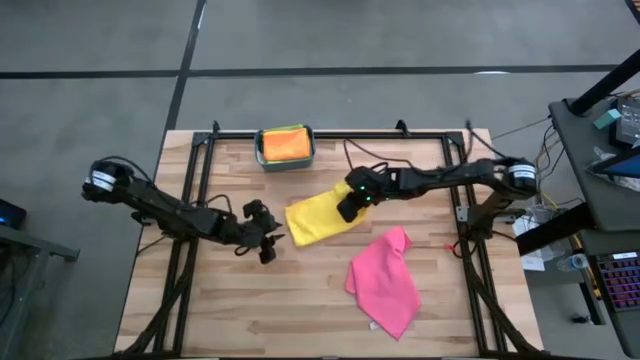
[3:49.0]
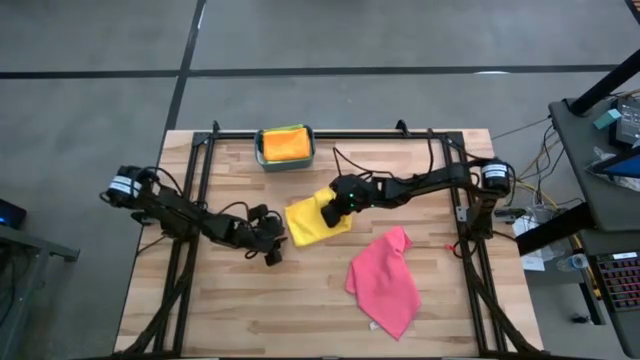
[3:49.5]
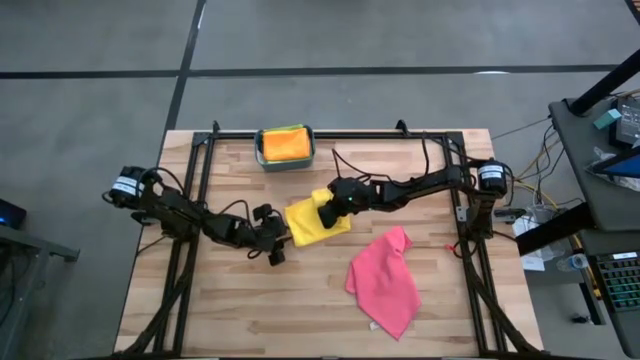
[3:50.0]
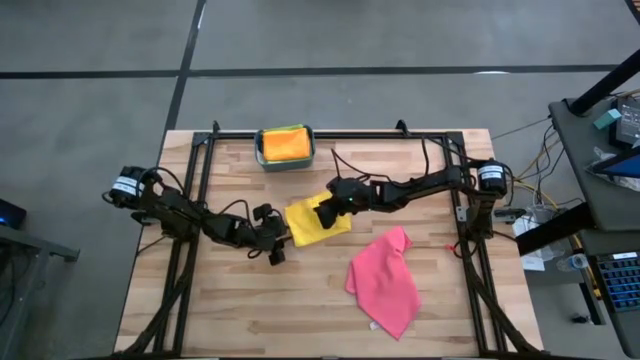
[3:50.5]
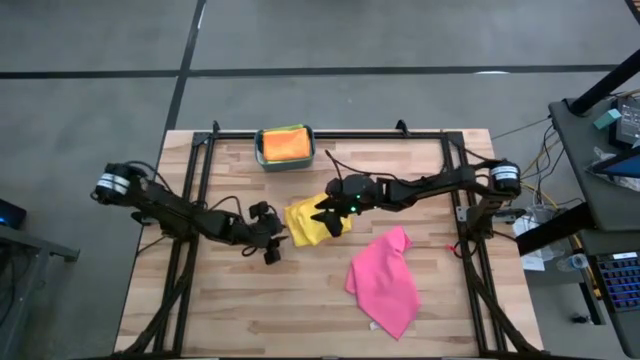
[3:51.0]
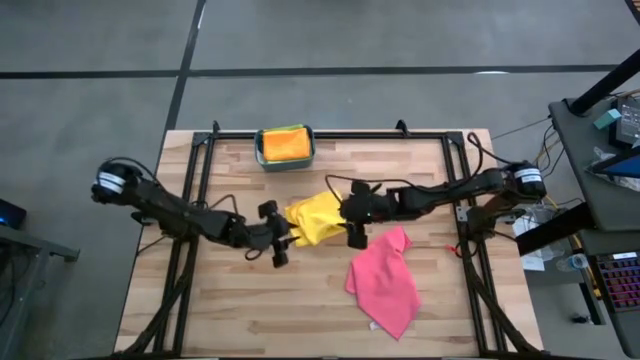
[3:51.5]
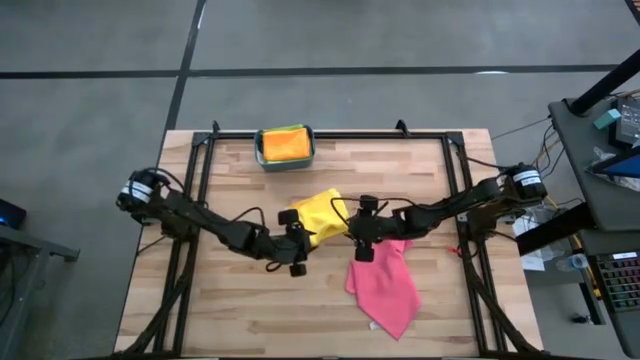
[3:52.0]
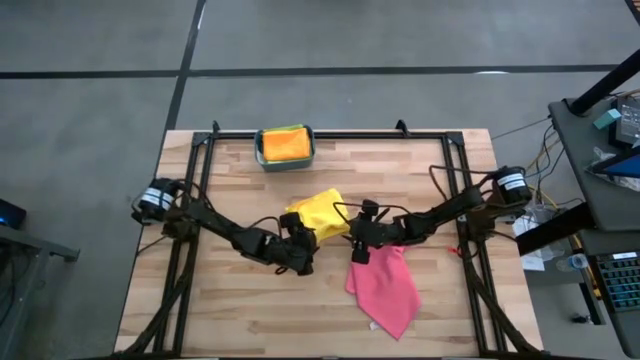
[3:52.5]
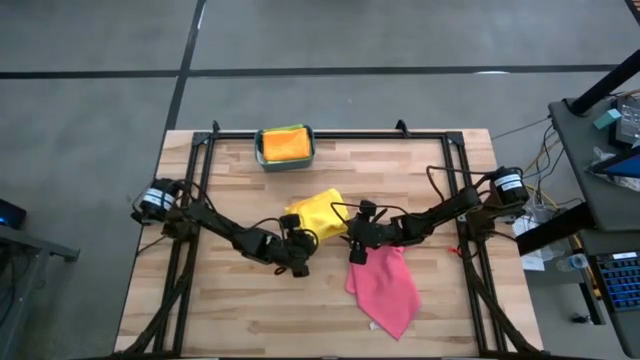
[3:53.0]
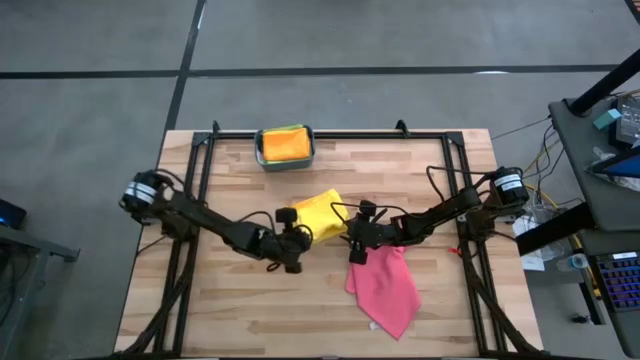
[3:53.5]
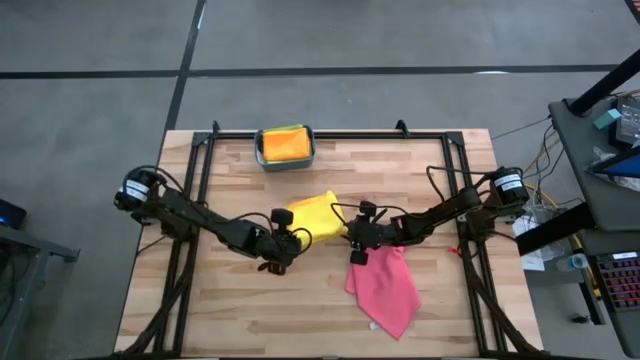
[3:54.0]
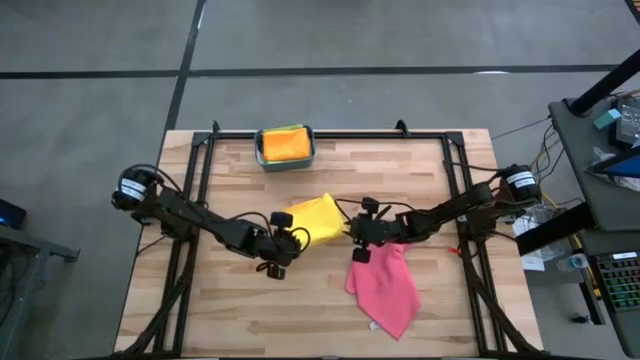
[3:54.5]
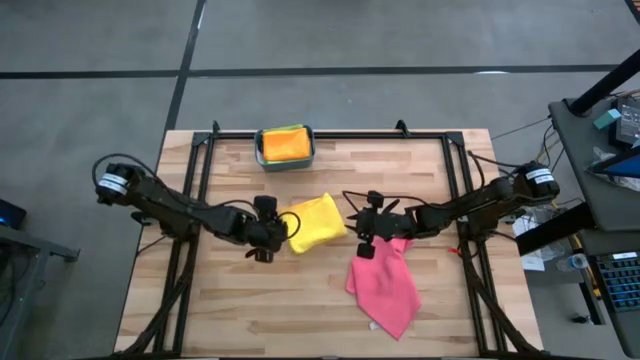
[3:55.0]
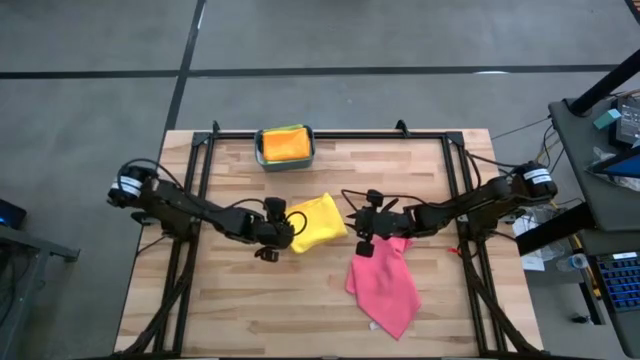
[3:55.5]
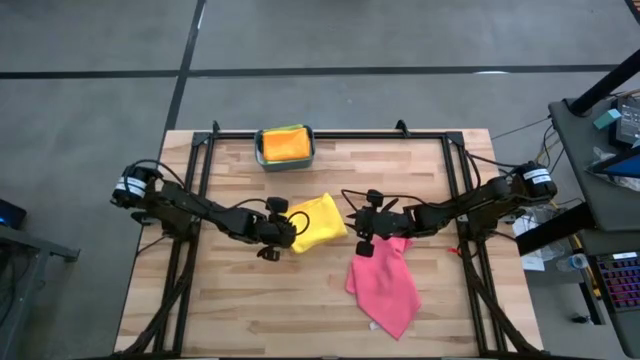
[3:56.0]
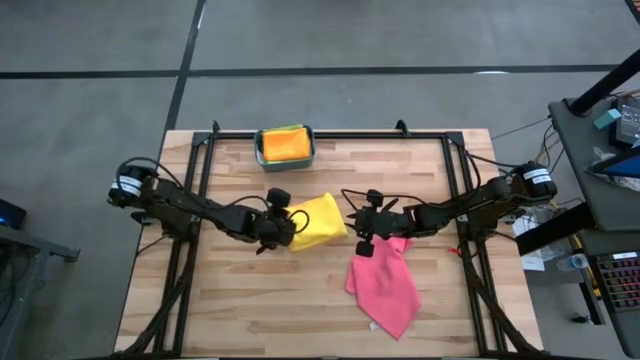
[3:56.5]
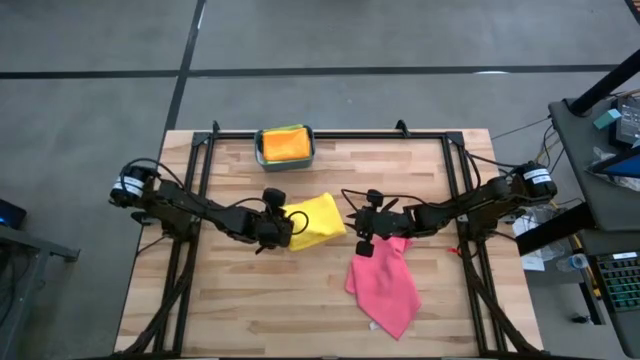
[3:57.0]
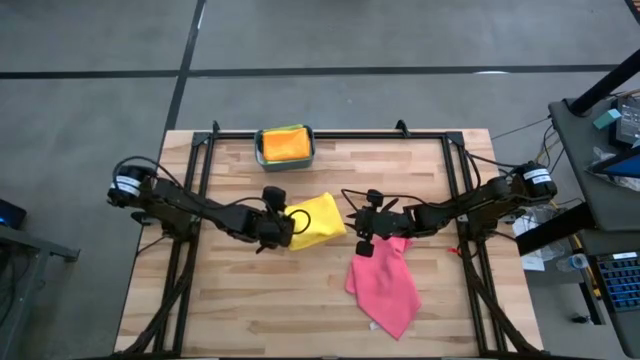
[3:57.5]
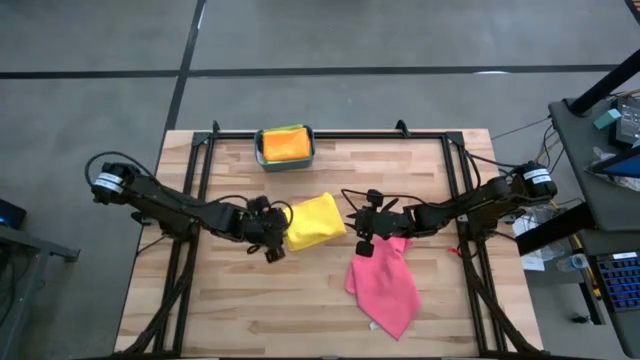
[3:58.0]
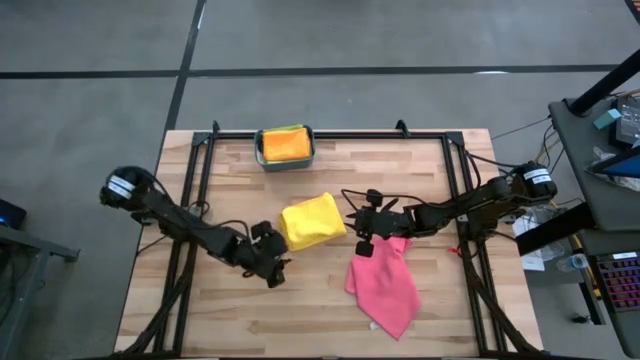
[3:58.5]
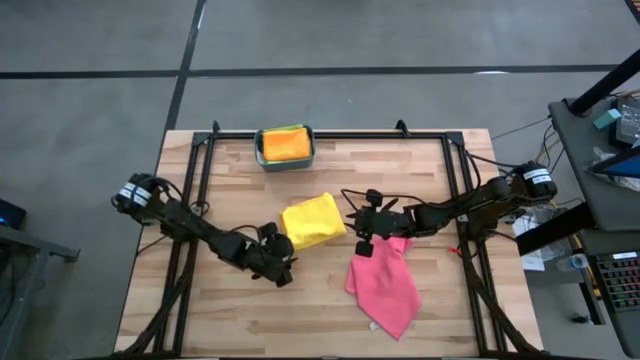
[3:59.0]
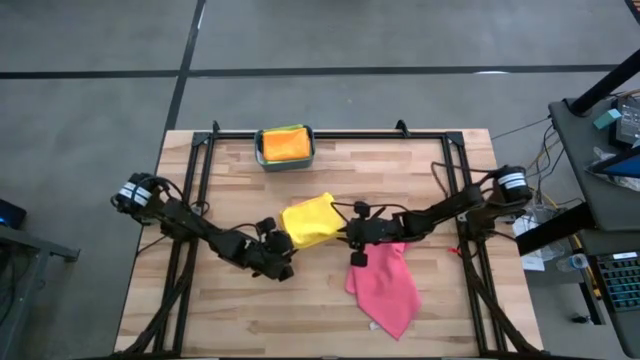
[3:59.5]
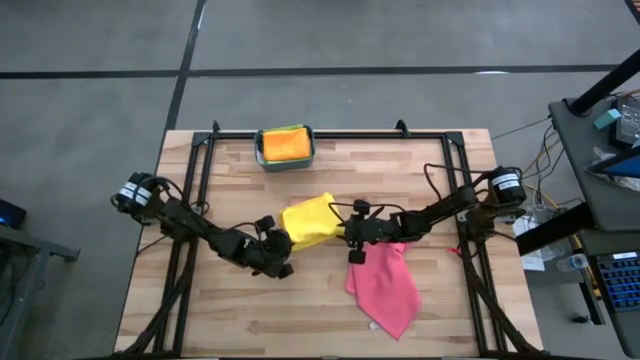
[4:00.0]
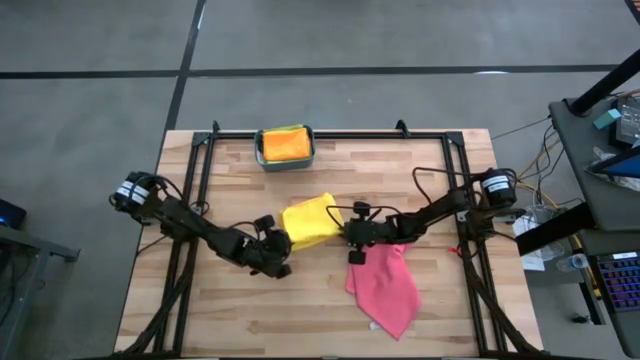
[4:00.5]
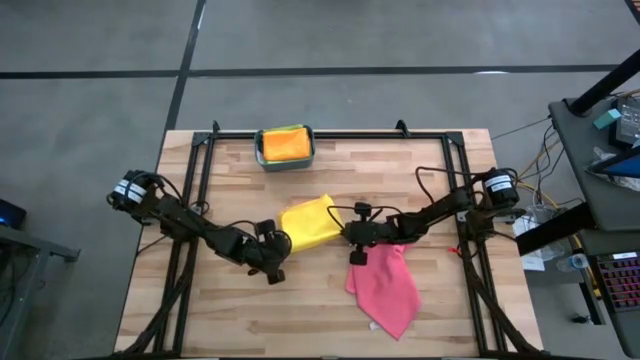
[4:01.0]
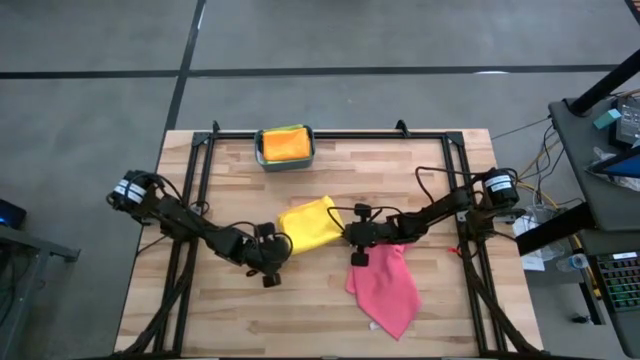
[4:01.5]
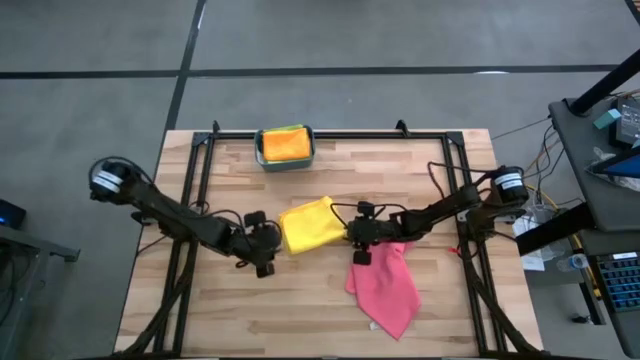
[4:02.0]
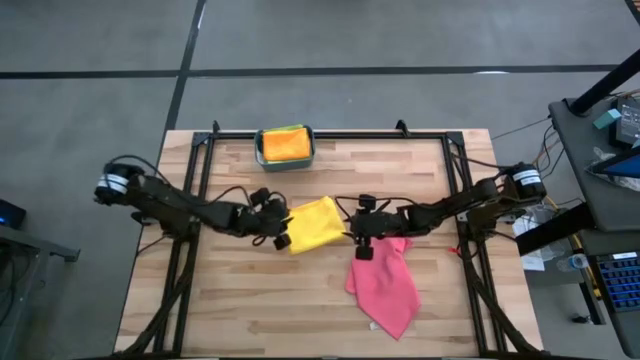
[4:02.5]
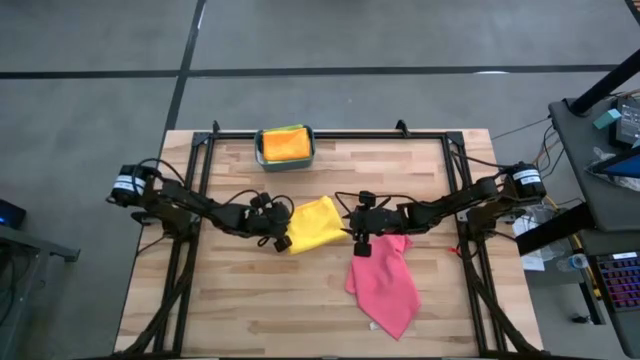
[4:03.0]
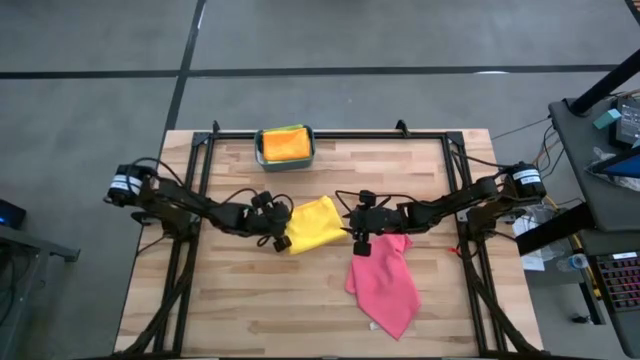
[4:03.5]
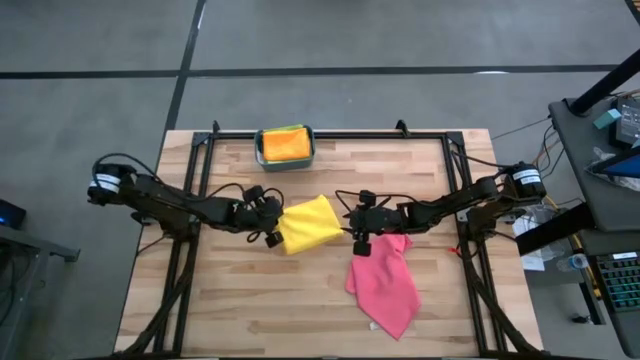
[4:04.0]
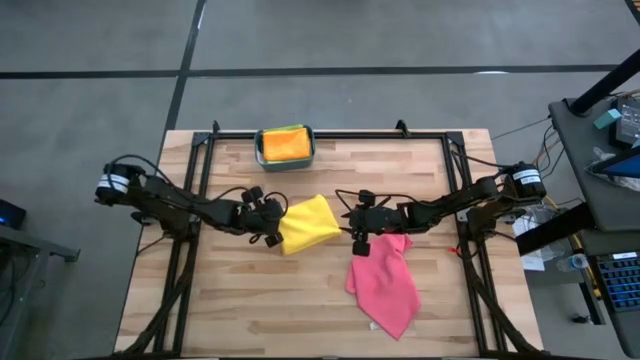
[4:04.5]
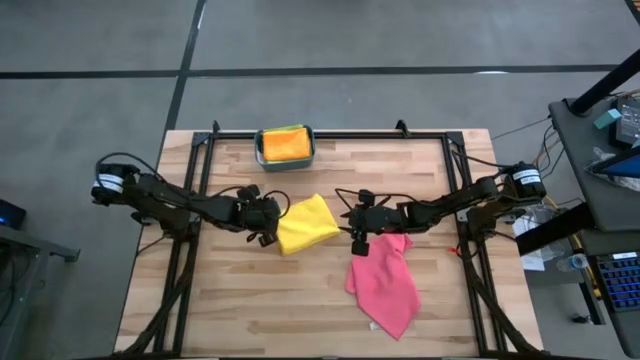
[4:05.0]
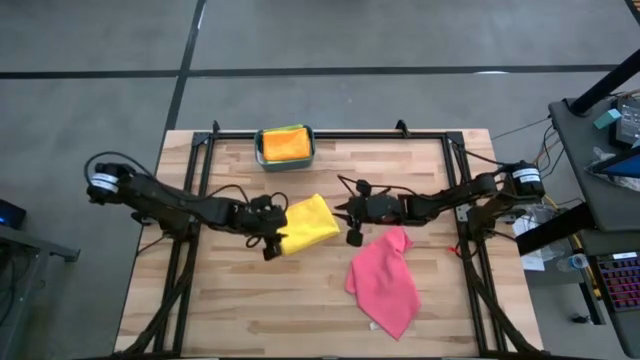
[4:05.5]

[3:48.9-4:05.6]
Task: Fold microfiber towels
Fold the yellow towel

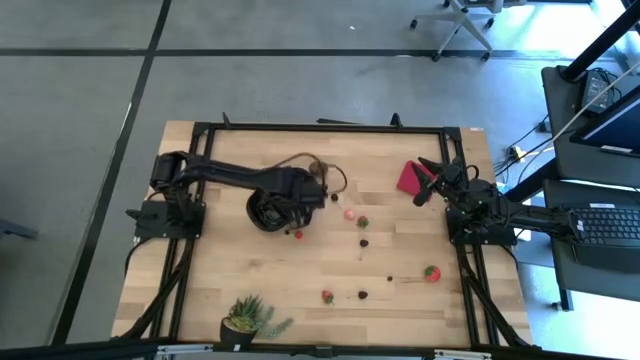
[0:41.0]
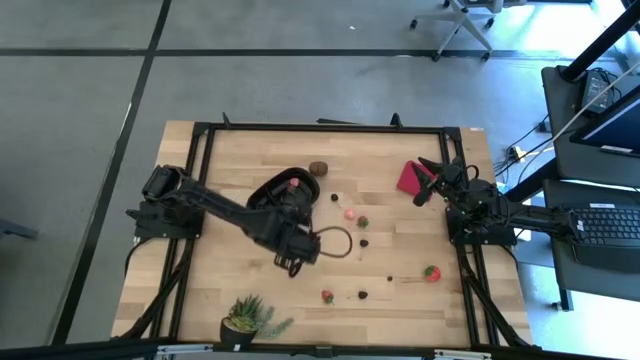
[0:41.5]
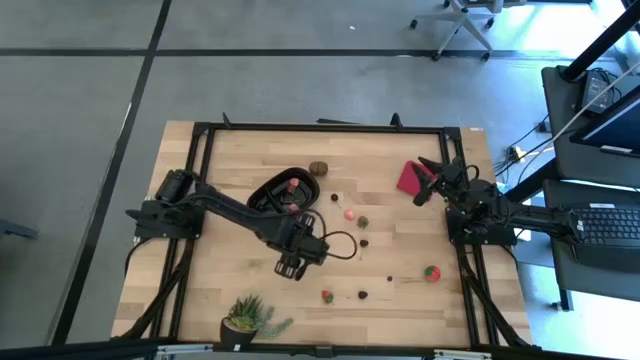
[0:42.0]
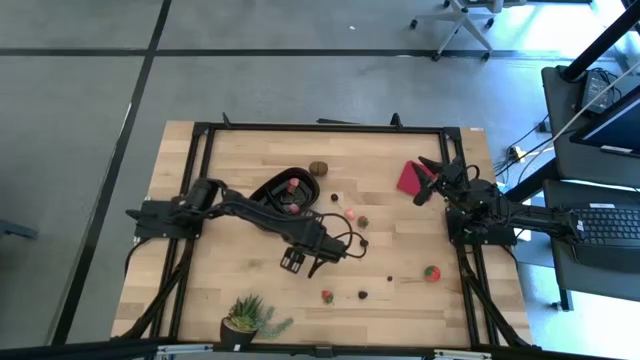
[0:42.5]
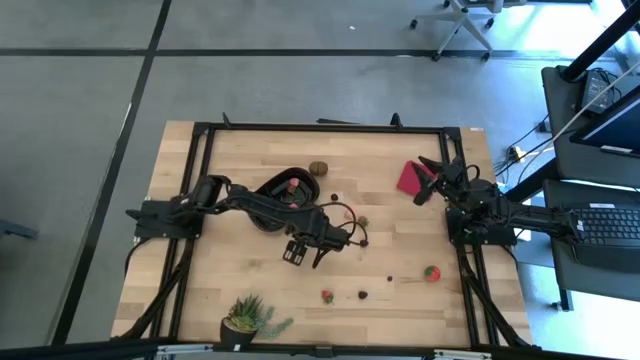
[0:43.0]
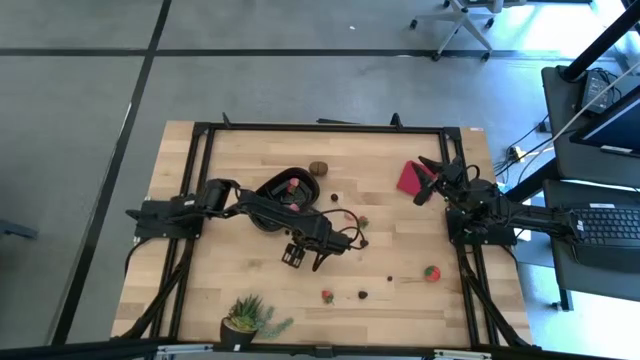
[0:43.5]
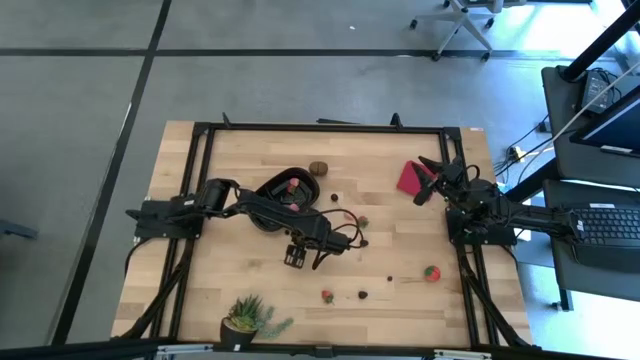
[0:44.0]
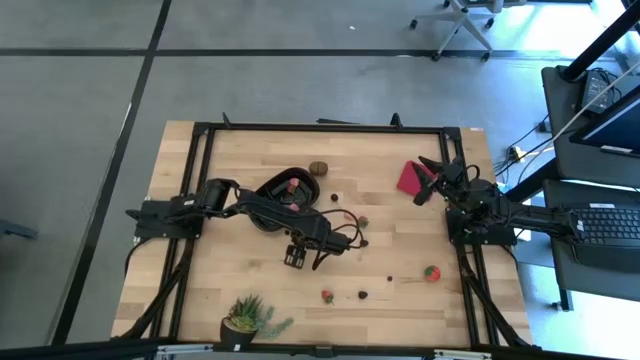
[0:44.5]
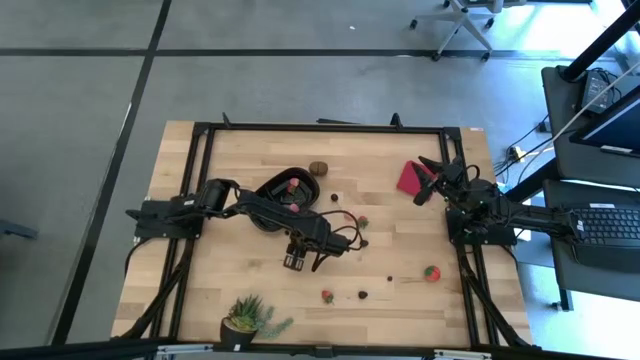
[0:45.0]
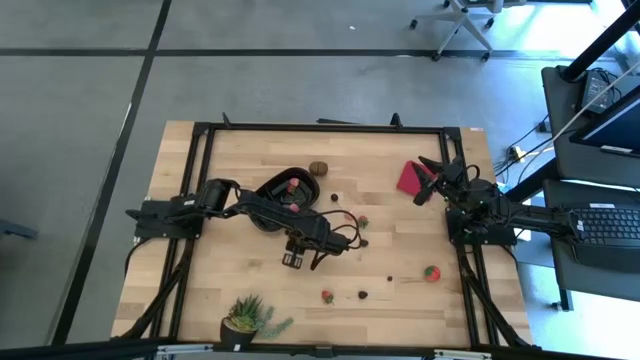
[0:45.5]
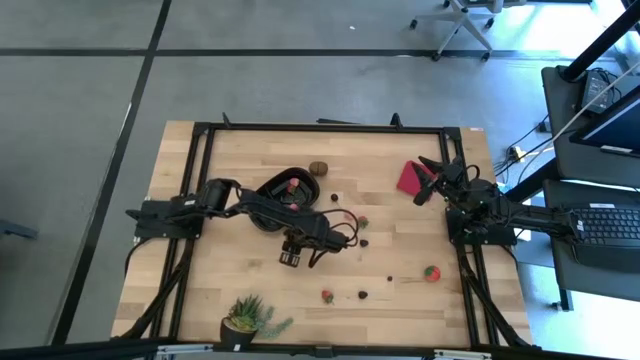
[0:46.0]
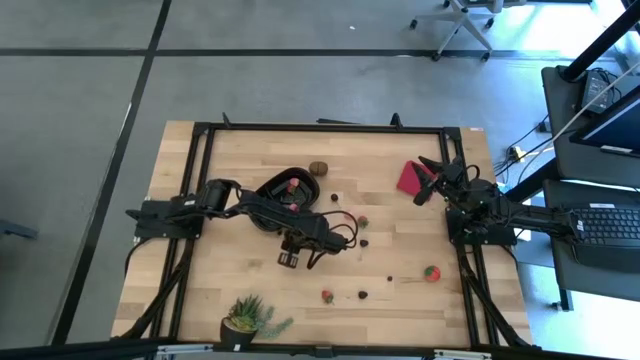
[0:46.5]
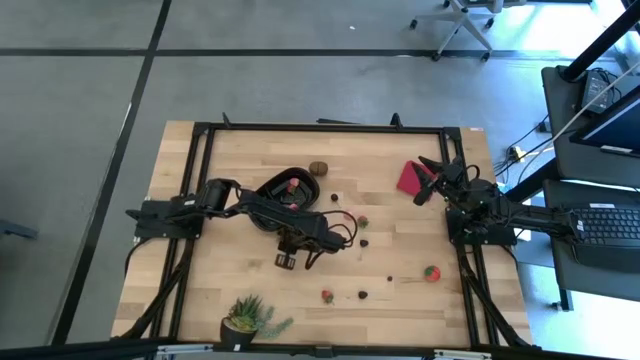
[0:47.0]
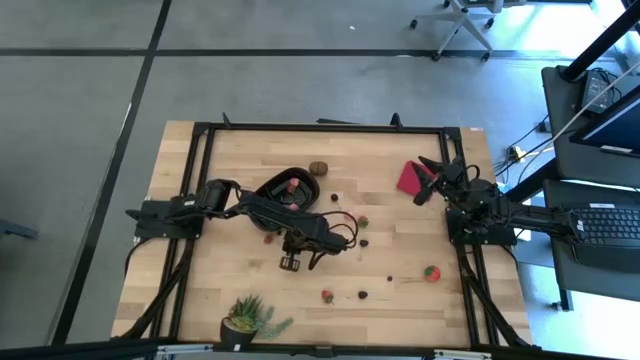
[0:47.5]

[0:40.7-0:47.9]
Task: Pick and placing Produce into tupperware
Put the red strawberry into the black bin
